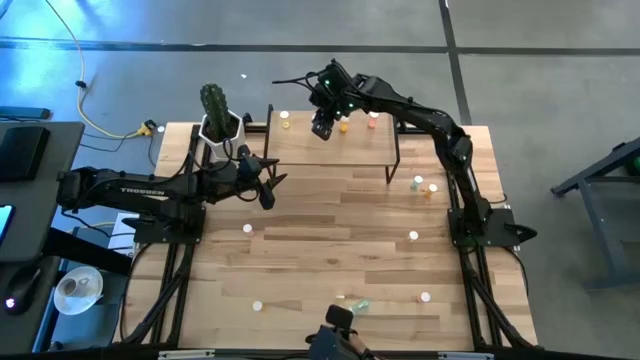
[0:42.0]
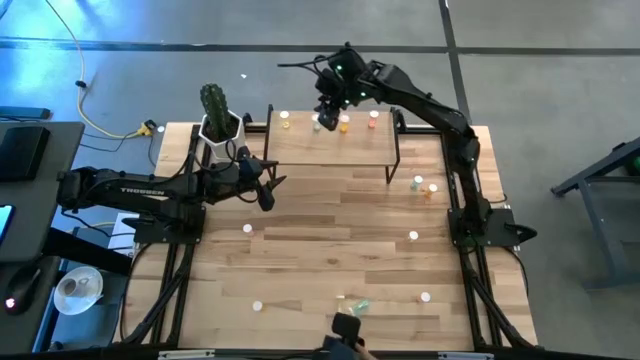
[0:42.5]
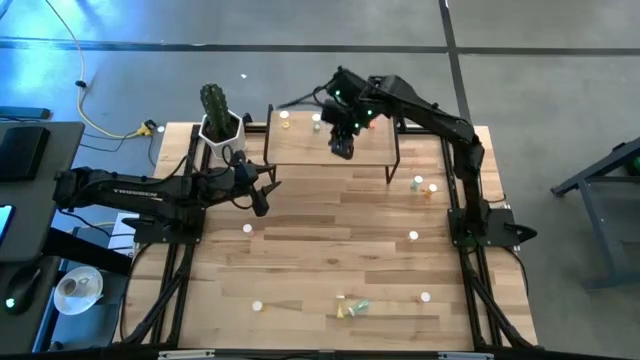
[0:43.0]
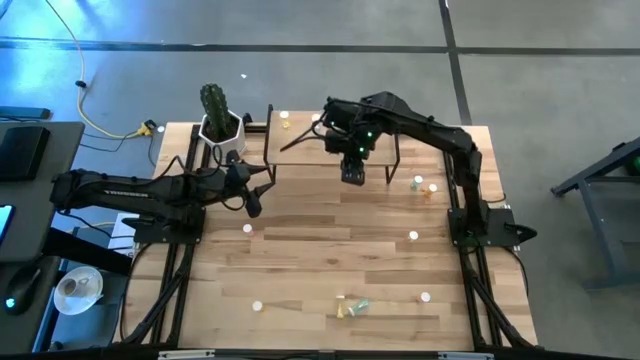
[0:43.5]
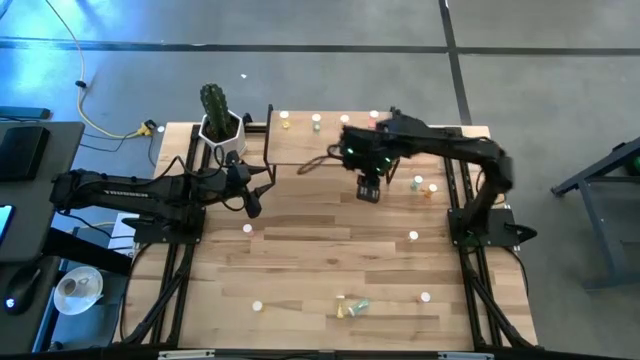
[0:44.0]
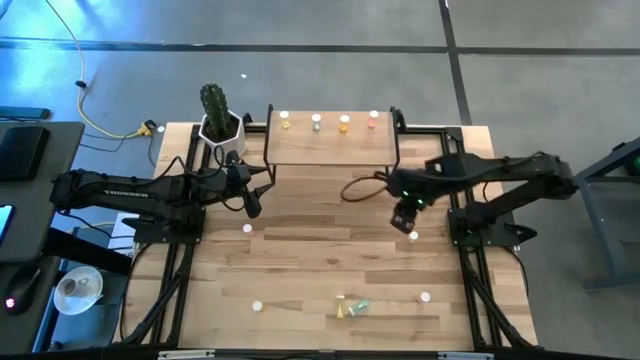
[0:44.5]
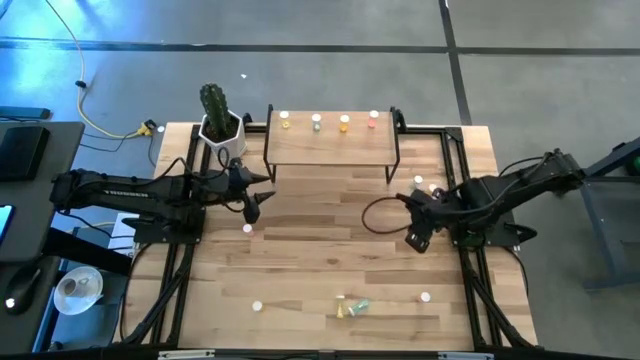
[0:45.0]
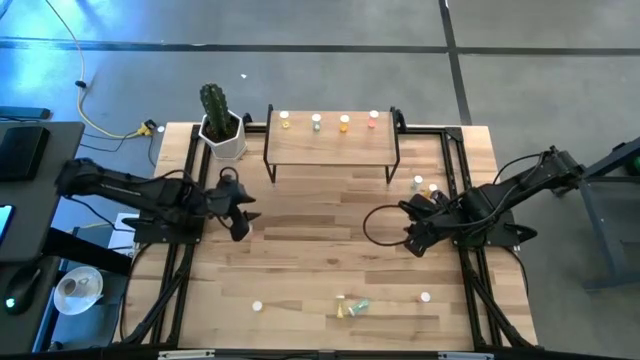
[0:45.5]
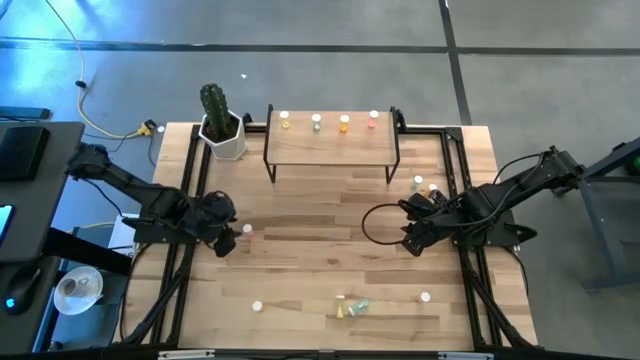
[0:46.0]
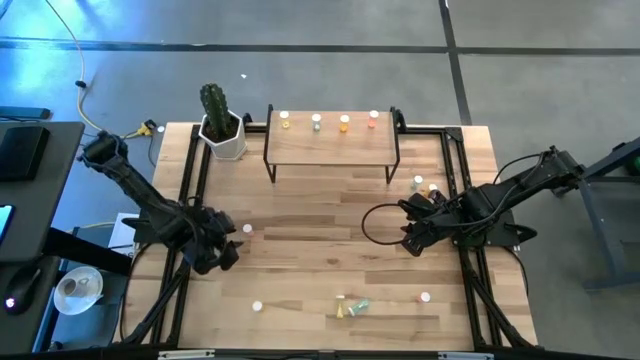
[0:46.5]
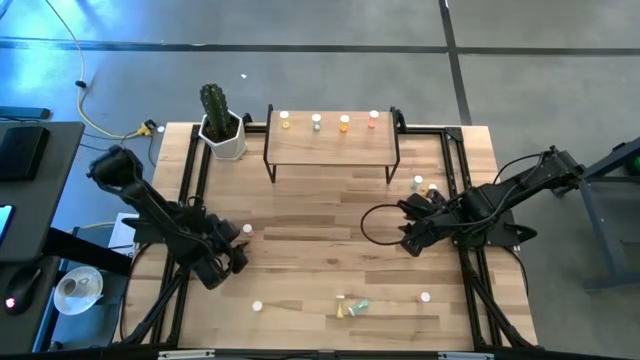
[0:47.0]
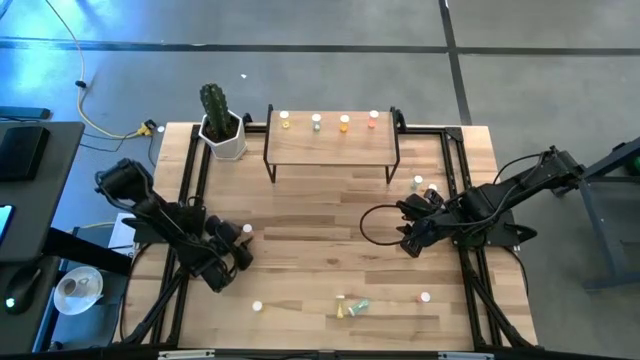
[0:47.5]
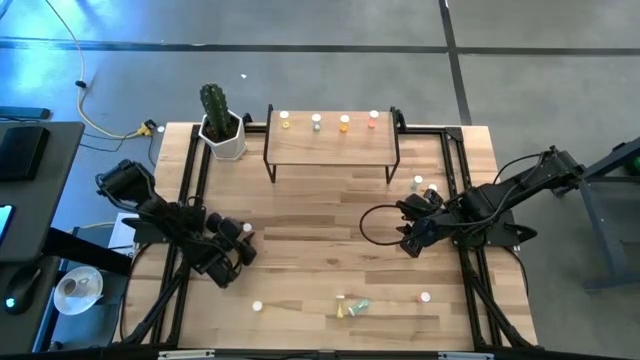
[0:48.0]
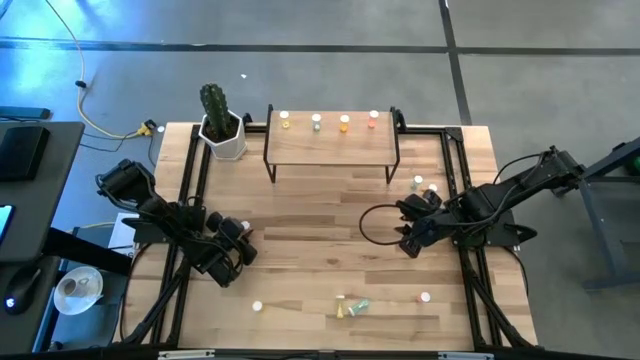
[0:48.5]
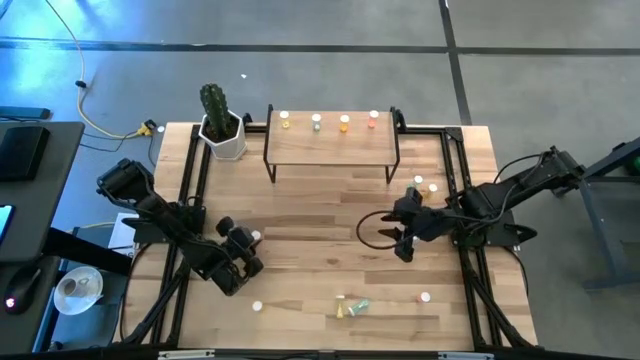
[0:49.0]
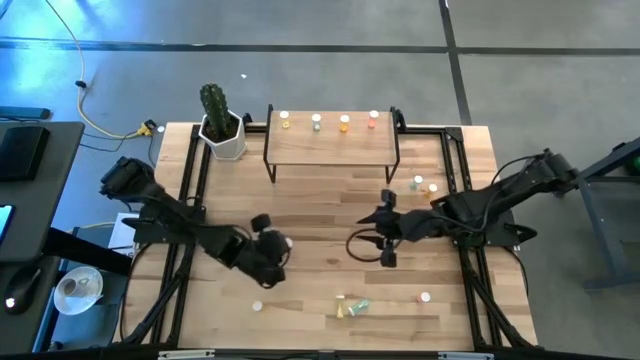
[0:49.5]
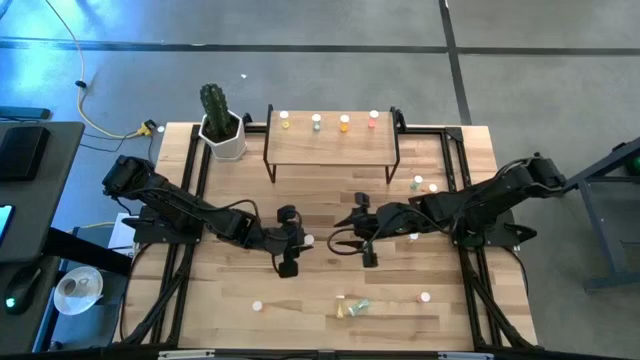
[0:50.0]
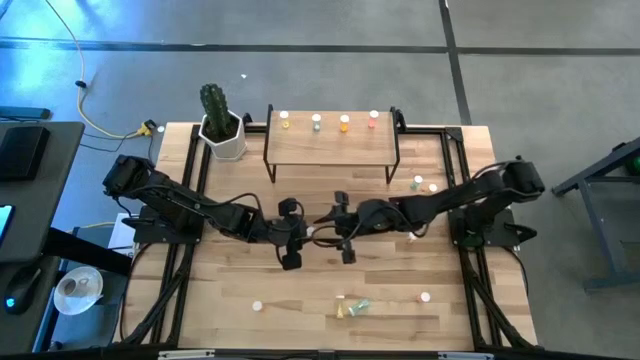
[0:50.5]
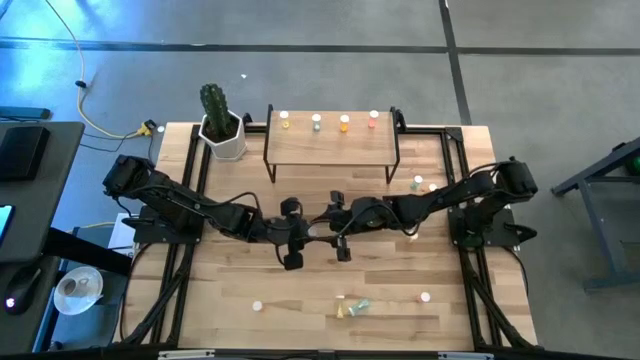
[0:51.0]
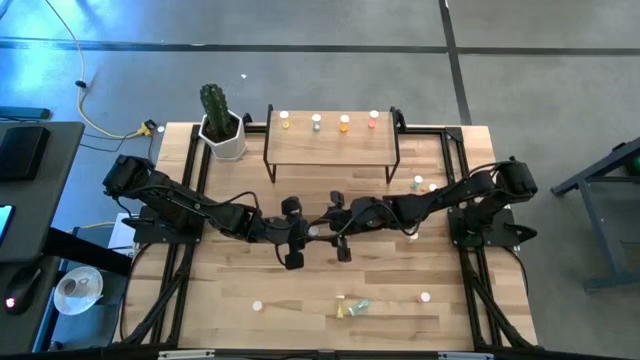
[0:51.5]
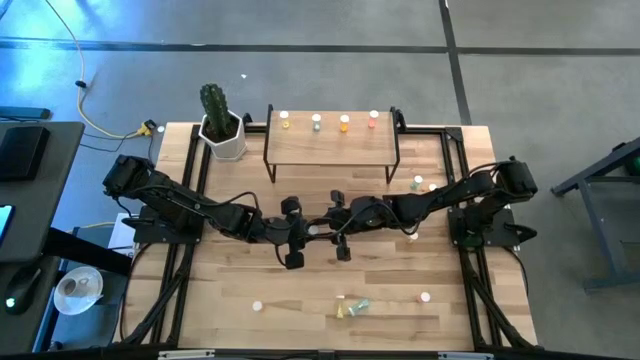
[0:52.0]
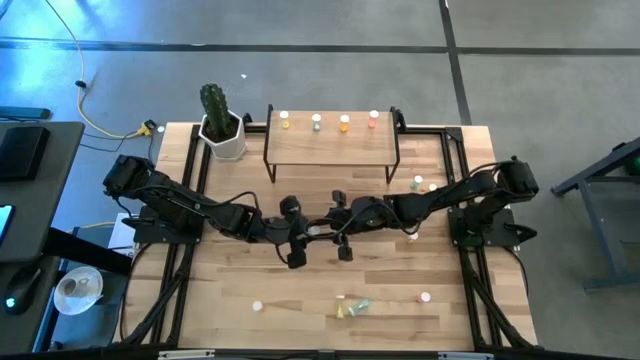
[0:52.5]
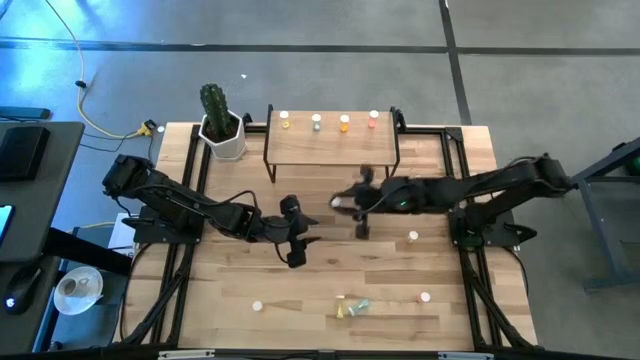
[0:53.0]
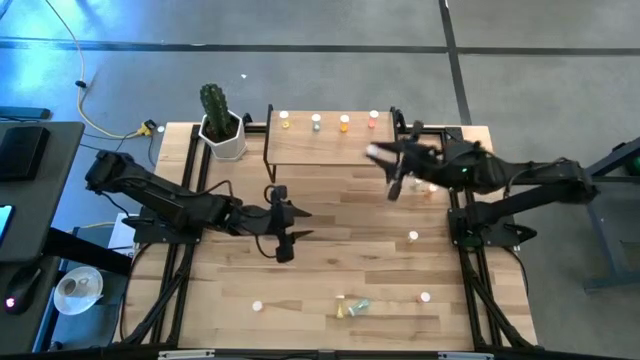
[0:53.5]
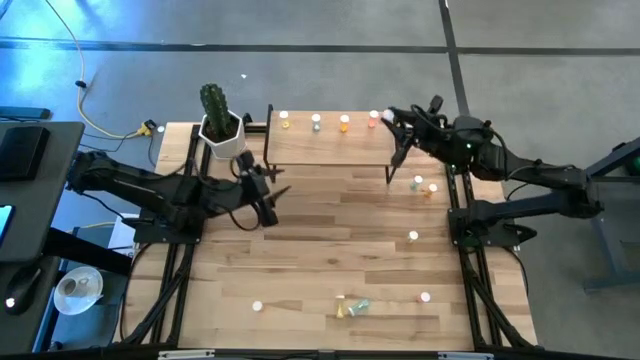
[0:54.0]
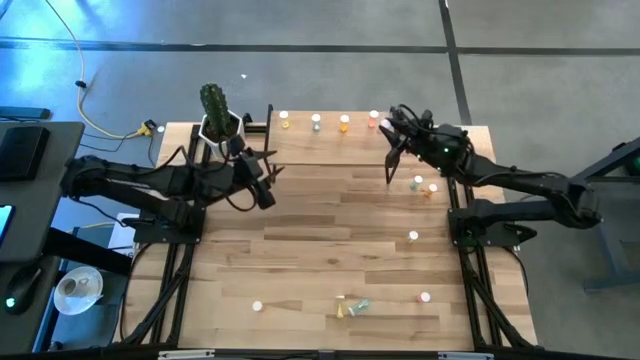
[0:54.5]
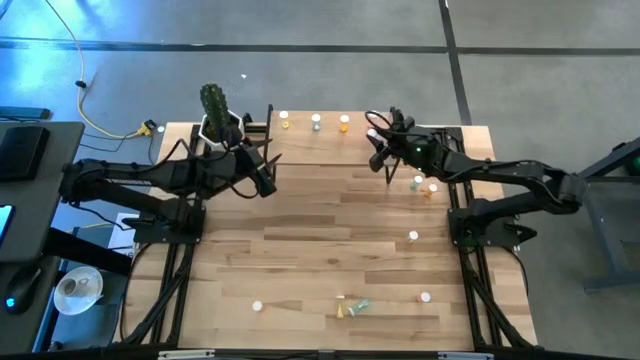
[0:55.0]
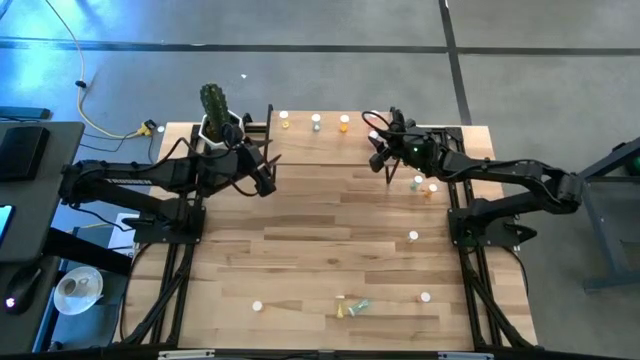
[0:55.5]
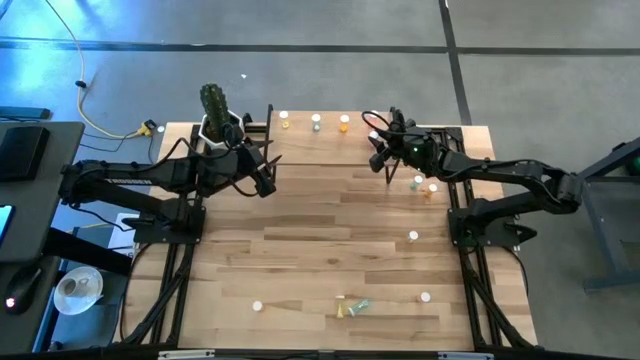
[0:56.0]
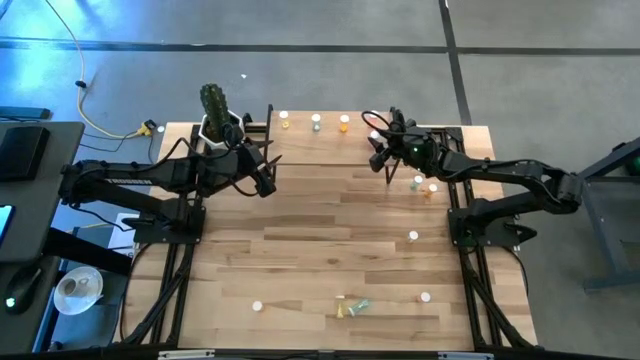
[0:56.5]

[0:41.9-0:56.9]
Task: Pick and place medicine bottles onto shelf by color
Put the left pink pill bottle on the shelf aligned with the other pink pill bottle

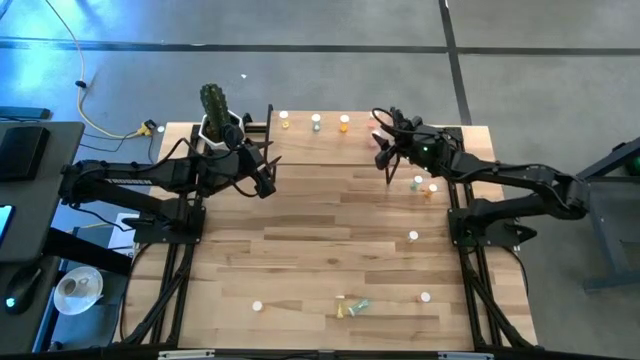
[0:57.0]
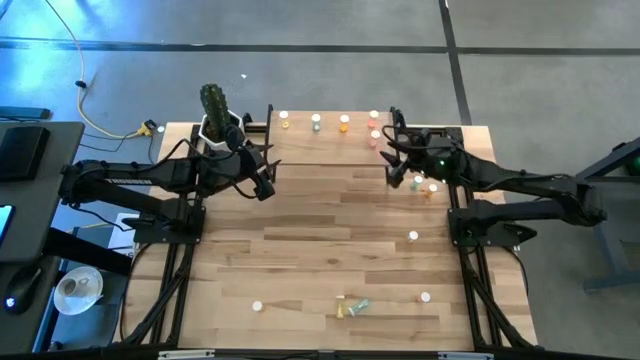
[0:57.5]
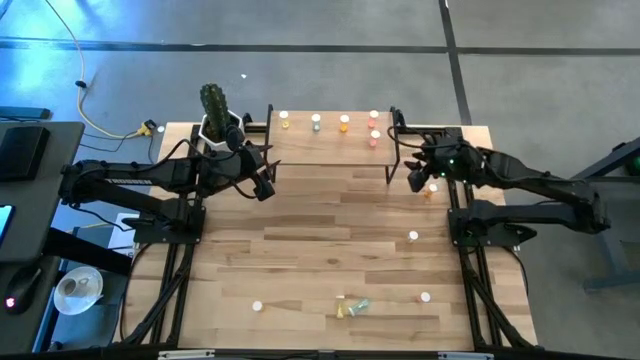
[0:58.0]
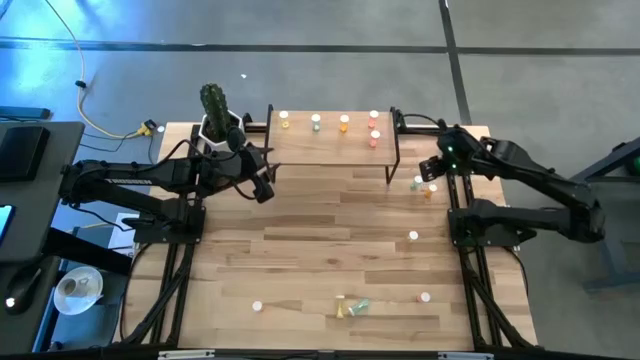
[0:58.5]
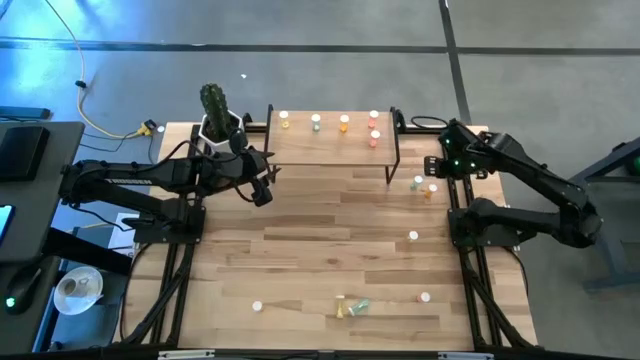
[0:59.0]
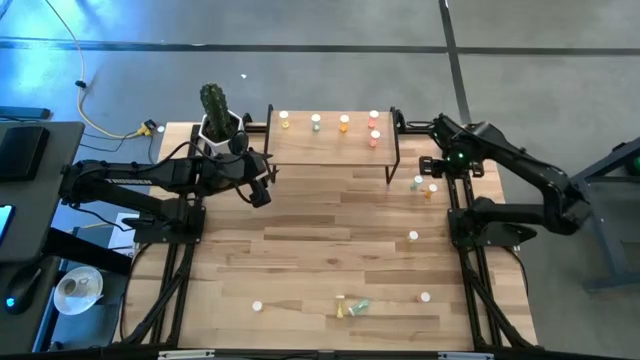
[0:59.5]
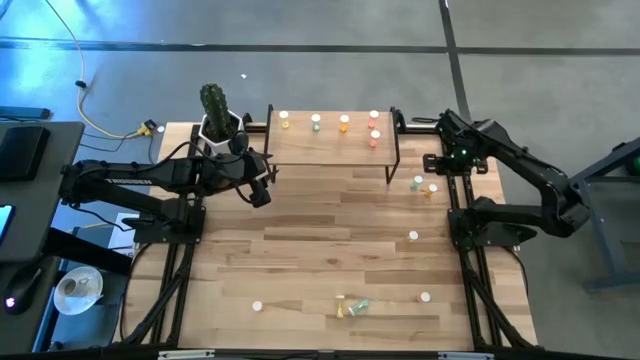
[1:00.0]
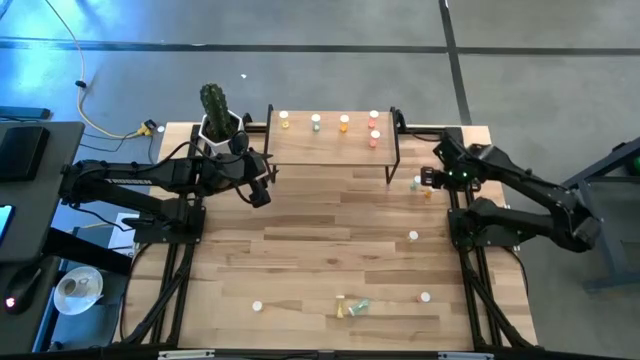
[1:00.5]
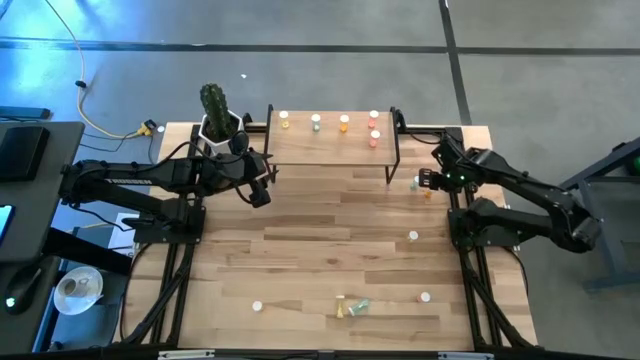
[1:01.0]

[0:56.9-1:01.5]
Put the top orange pill bottle on the shelf aligned with the other orange pill bottle

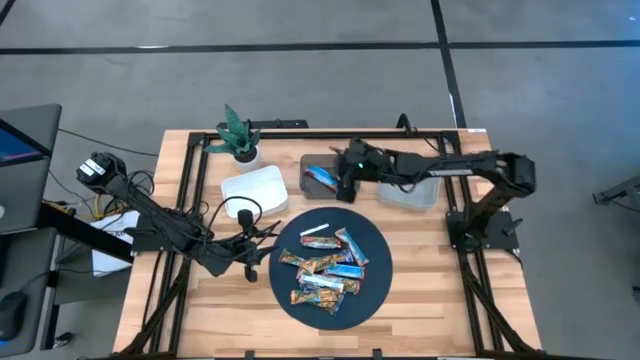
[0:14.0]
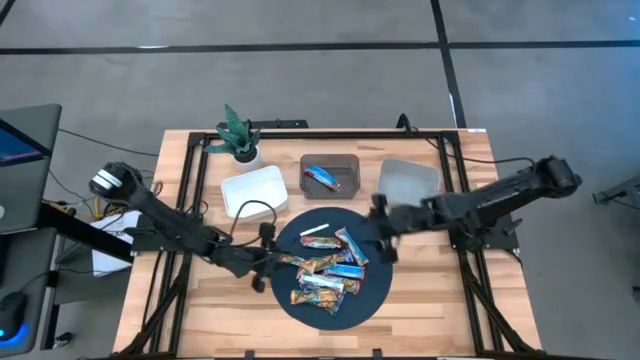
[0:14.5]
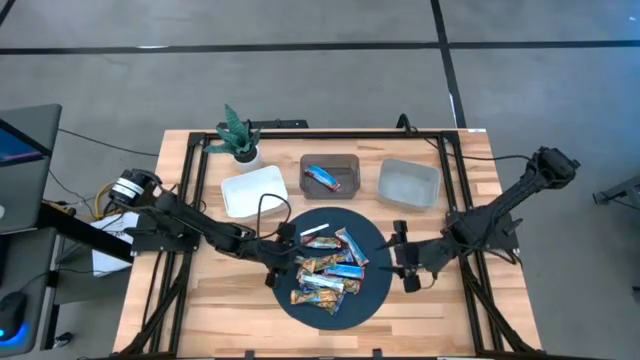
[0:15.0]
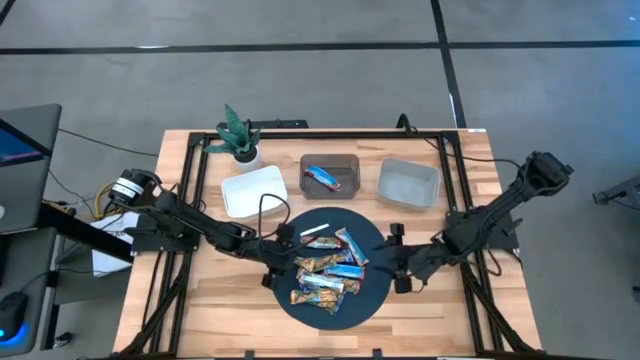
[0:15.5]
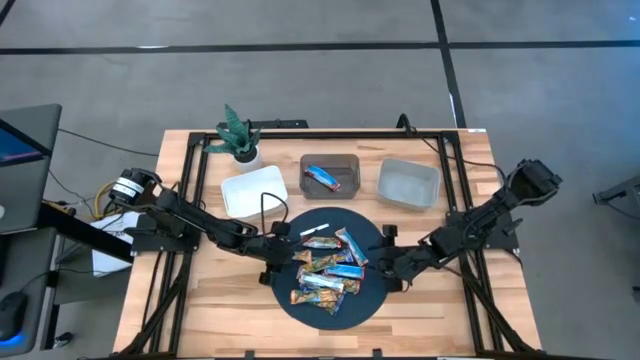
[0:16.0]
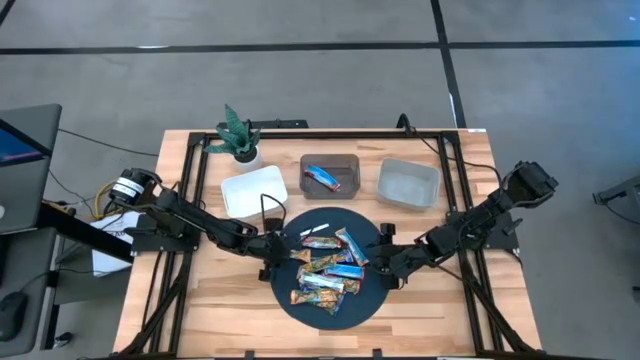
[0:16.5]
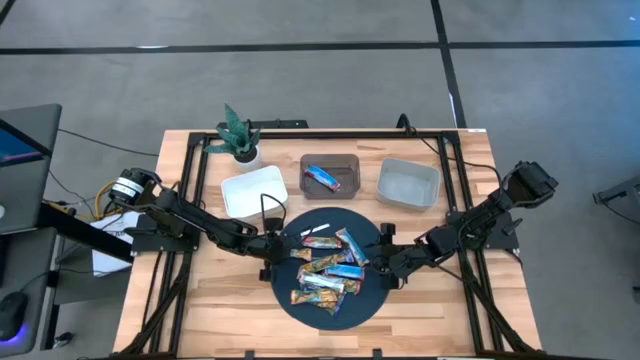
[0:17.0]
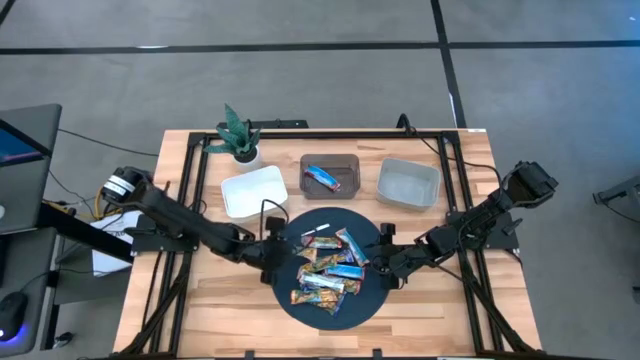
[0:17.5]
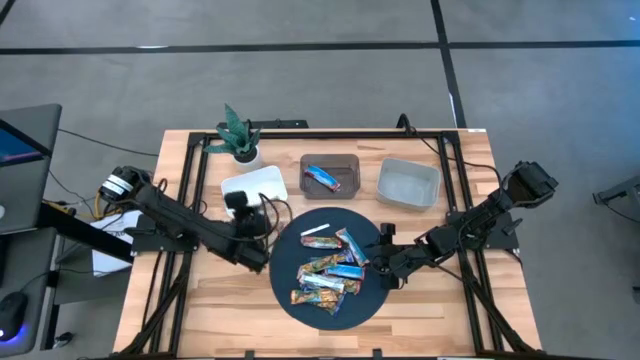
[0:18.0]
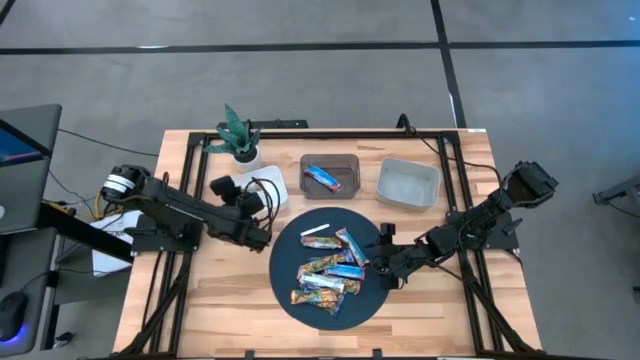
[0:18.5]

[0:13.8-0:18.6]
Task: Pick and place Granola Bars by type
Put the orange granola bar into the white bin
